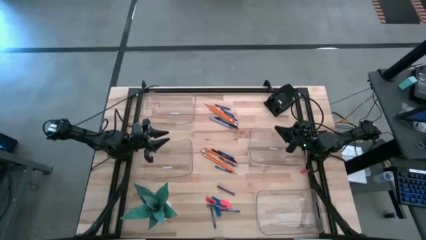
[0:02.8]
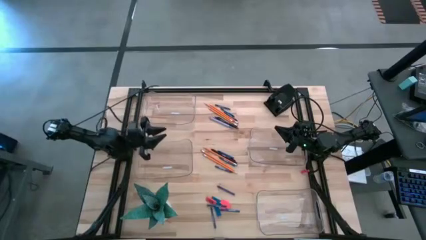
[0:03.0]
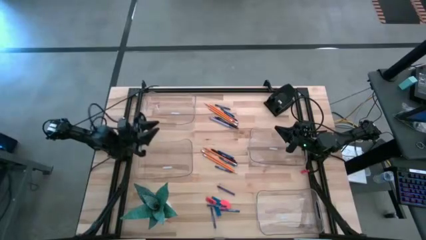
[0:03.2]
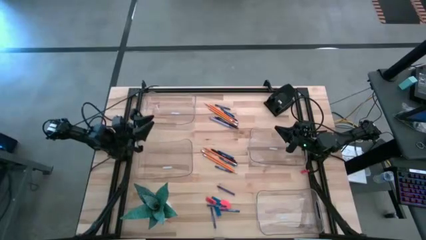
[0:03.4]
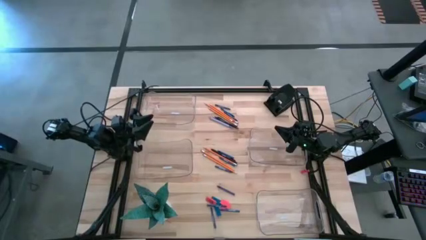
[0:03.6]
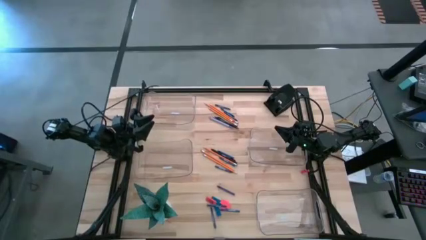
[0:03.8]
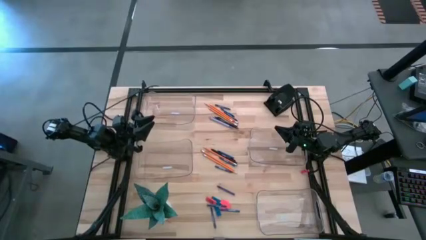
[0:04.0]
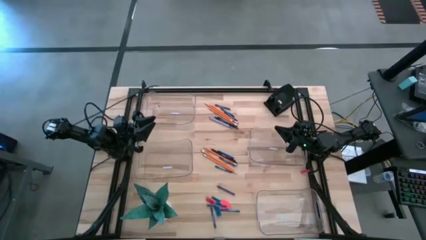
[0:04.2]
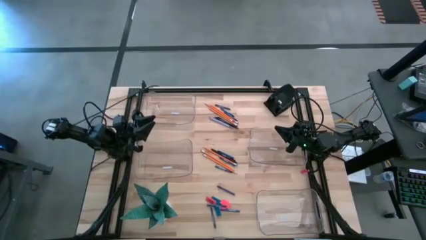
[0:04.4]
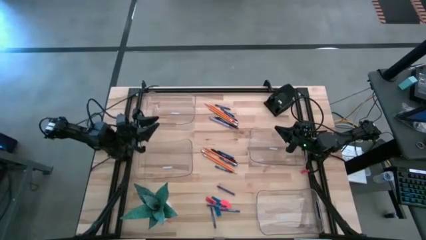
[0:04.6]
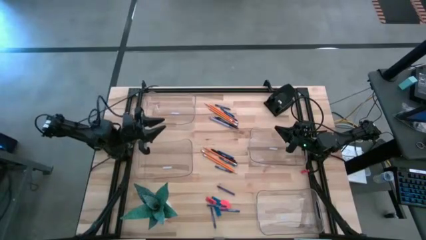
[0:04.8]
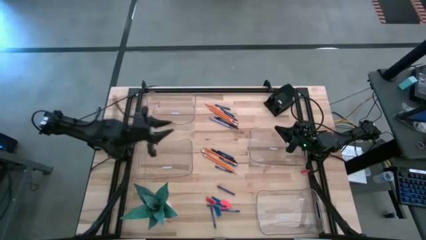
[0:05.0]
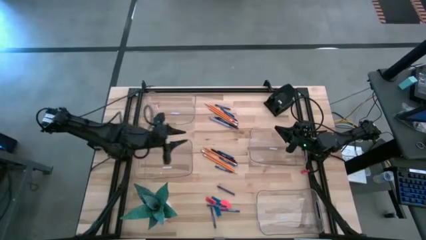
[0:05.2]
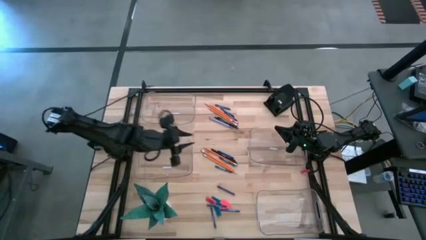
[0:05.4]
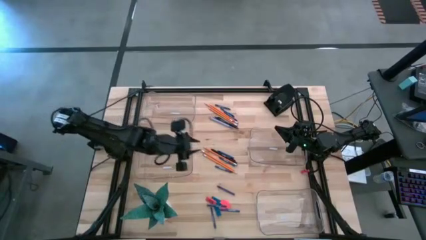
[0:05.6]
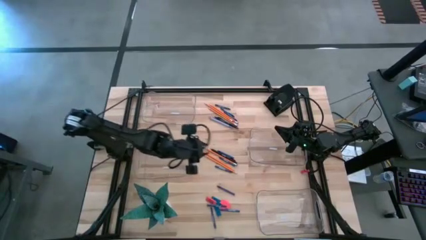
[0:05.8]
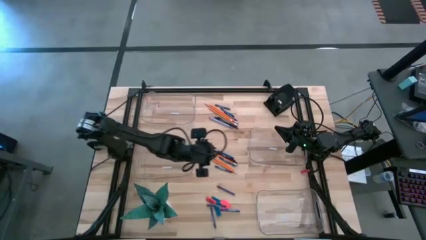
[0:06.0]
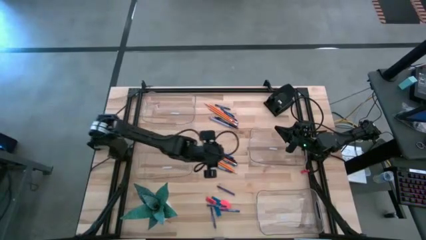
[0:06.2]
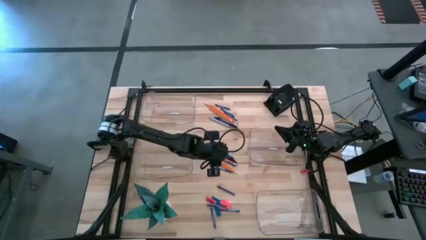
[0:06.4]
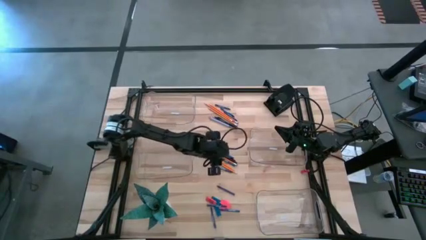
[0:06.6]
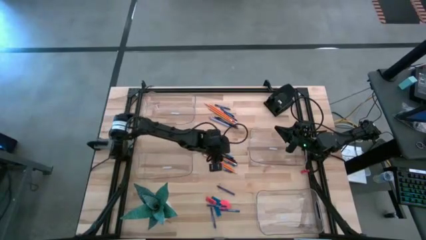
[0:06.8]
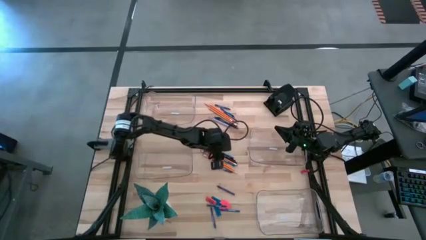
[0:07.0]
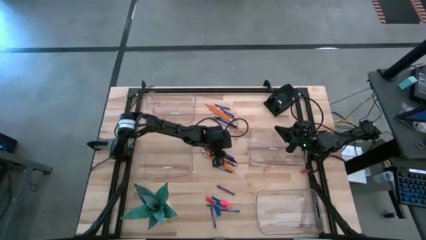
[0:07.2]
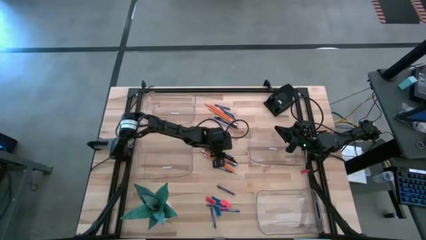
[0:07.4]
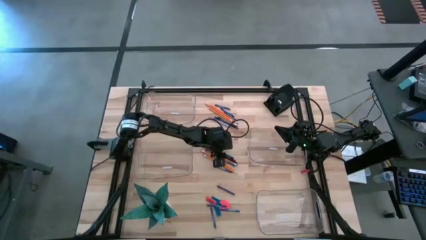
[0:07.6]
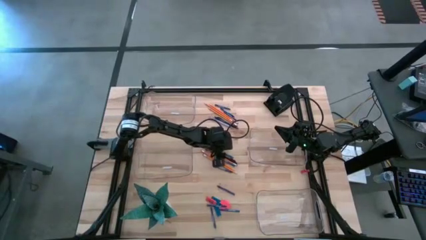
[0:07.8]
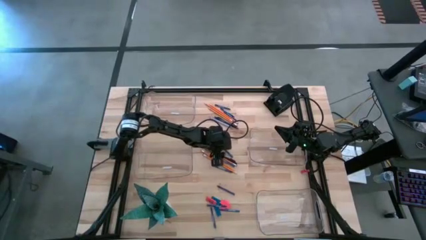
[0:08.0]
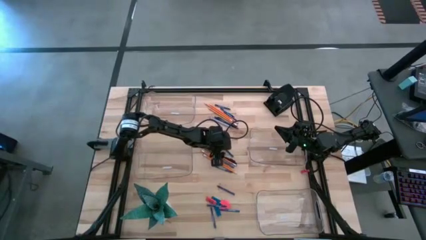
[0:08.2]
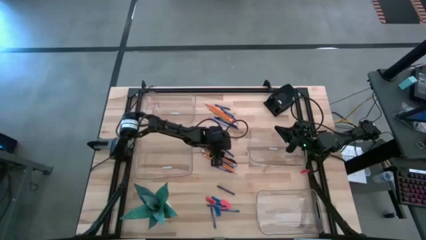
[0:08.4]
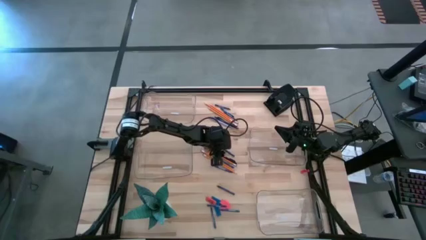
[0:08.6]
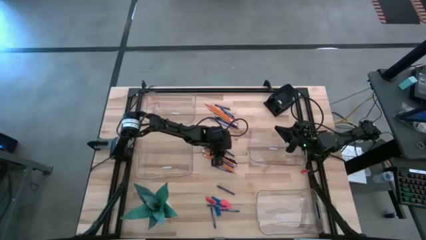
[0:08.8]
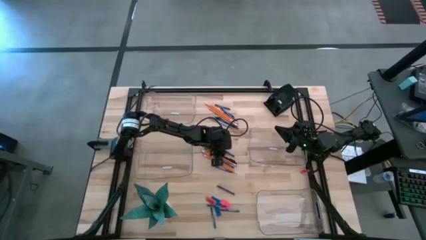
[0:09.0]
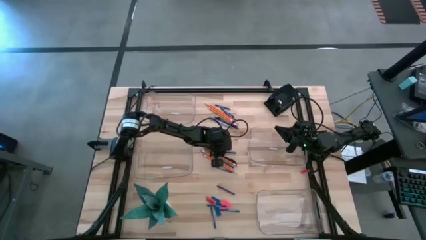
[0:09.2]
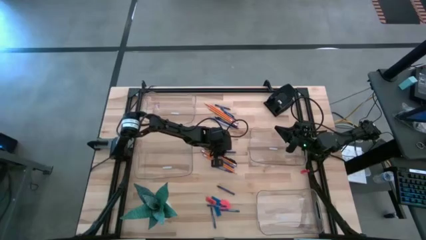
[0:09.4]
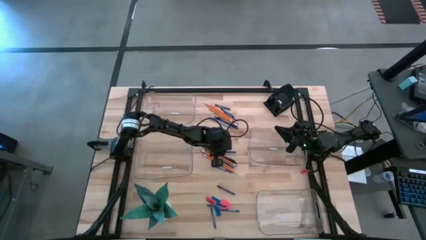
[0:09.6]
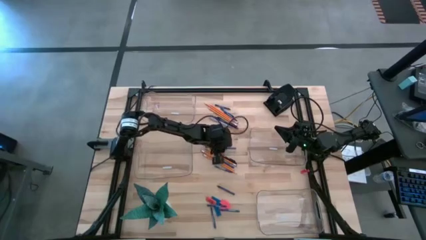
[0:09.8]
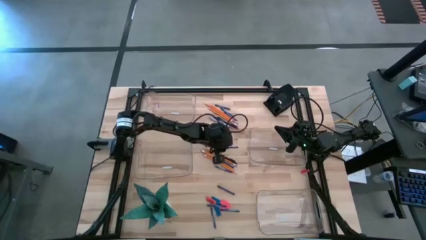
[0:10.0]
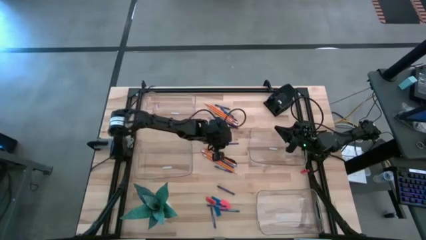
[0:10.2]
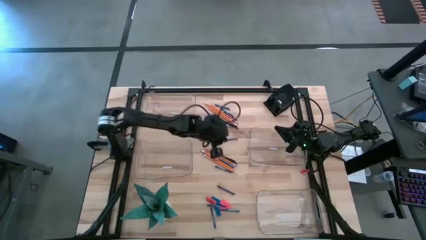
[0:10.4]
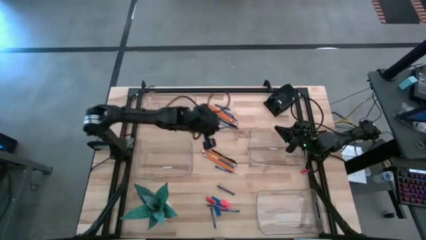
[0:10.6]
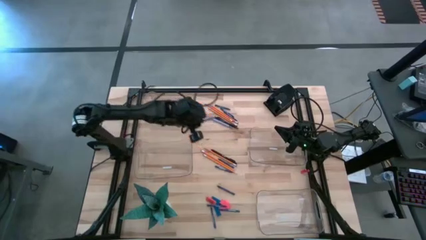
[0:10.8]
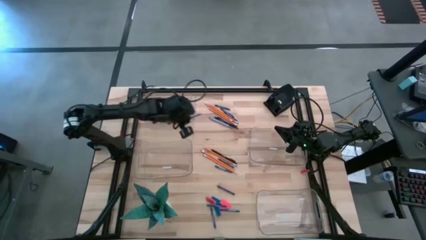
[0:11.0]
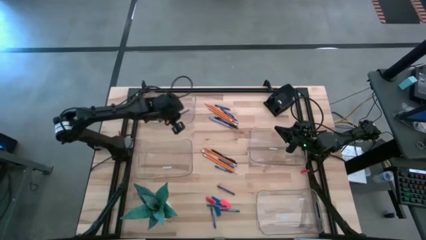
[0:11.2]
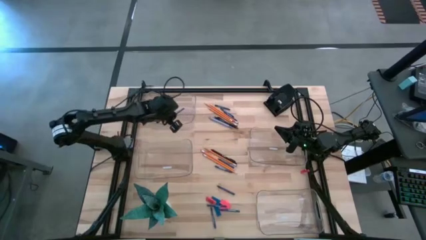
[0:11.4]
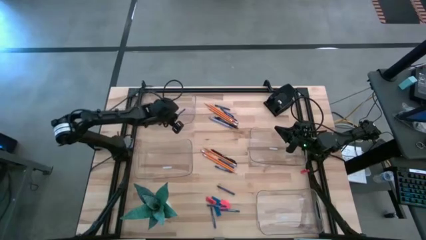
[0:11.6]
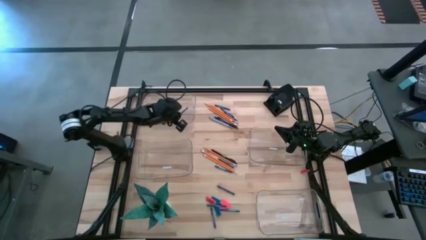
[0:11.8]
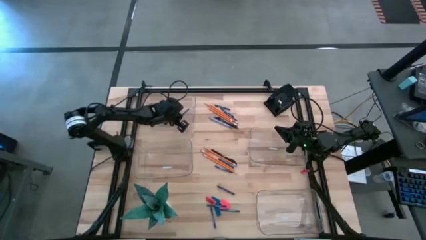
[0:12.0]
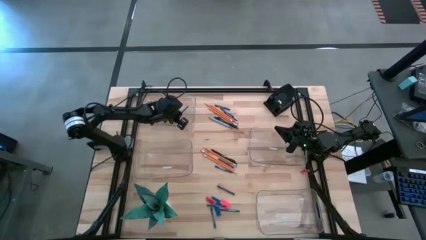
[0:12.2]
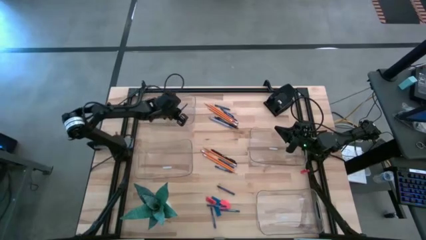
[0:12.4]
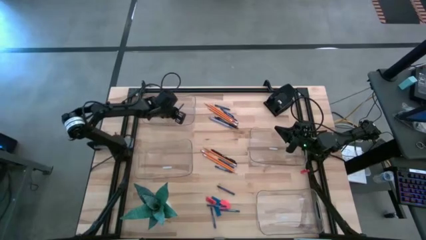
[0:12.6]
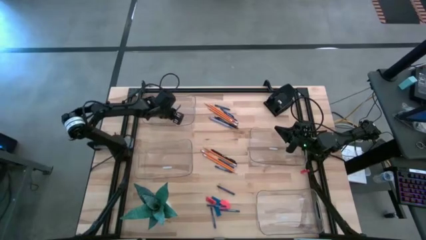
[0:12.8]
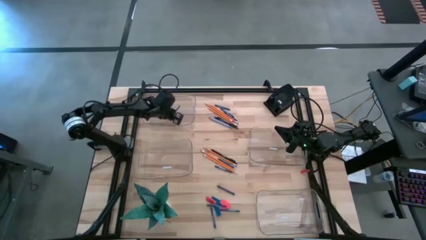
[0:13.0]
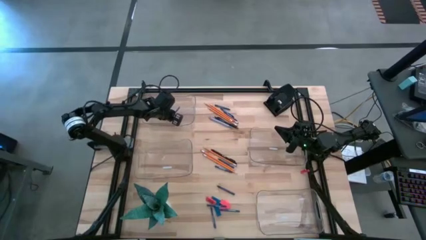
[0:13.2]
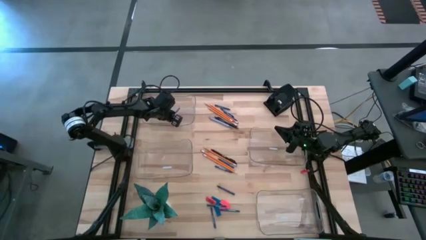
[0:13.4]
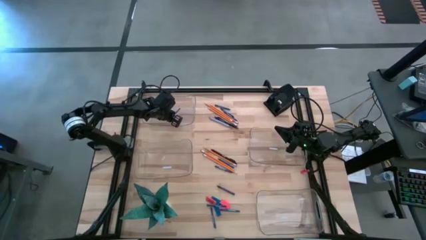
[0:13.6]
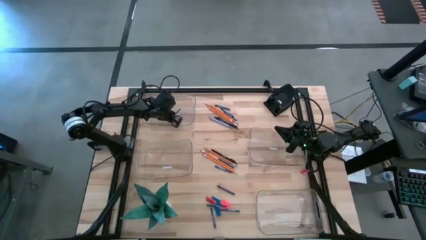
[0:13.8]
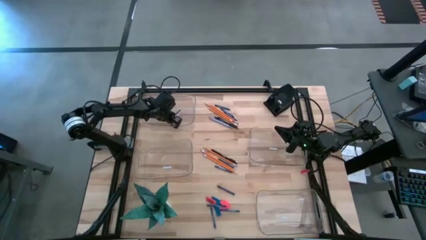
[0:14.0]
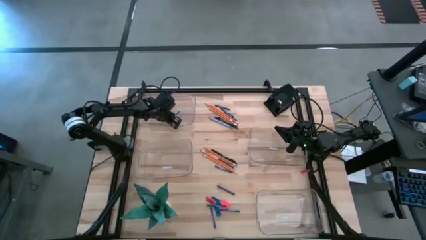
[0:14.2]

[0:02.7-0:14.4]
Task: Sort crayons/erasers/pens/pencils in bins
Put the blue crayon into the top transparent bin

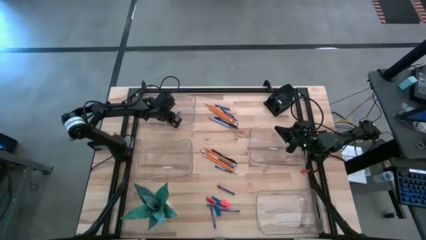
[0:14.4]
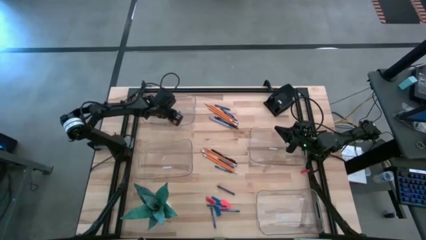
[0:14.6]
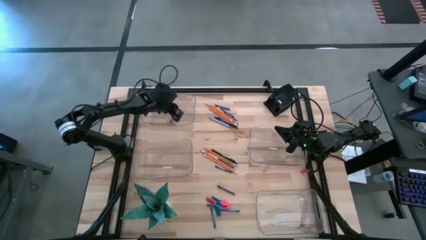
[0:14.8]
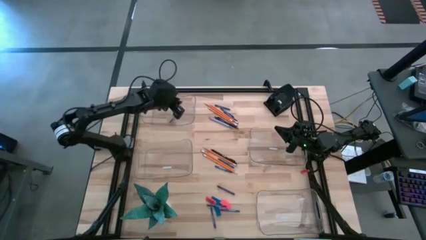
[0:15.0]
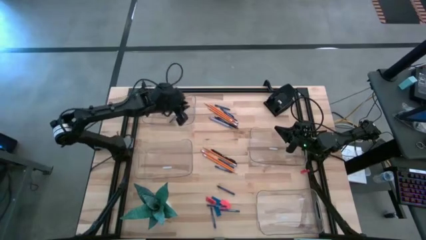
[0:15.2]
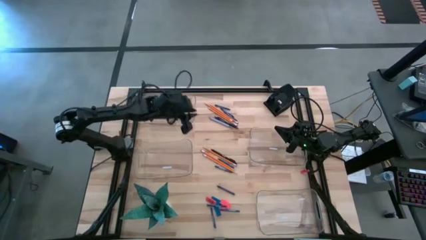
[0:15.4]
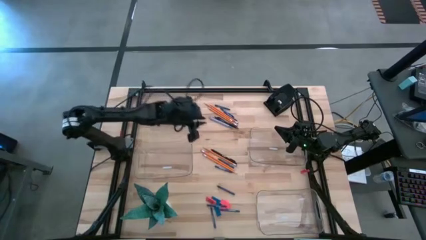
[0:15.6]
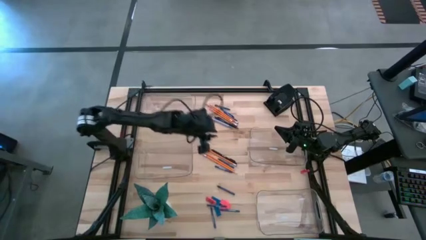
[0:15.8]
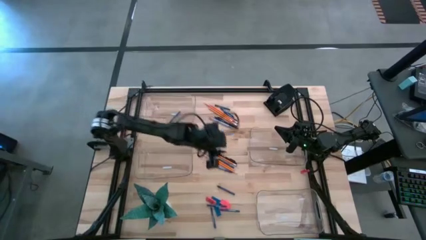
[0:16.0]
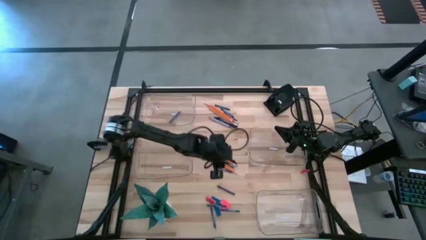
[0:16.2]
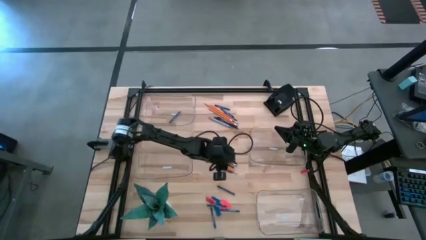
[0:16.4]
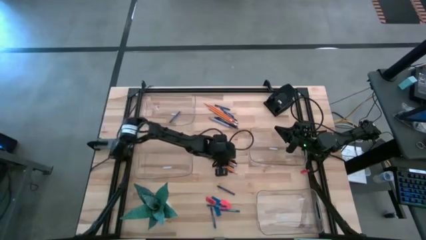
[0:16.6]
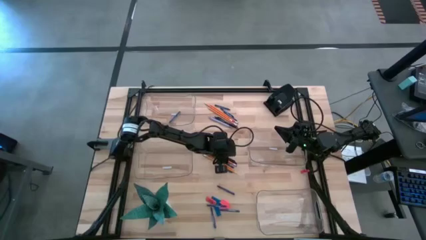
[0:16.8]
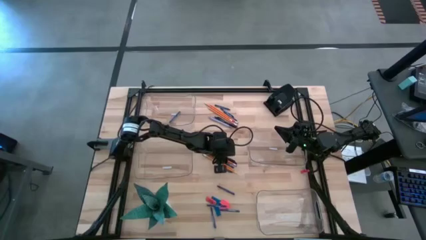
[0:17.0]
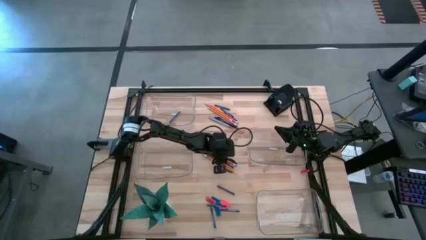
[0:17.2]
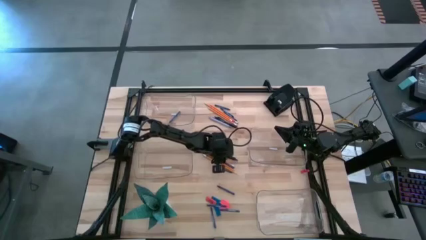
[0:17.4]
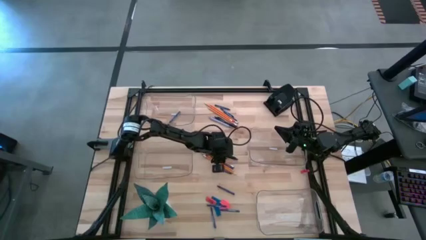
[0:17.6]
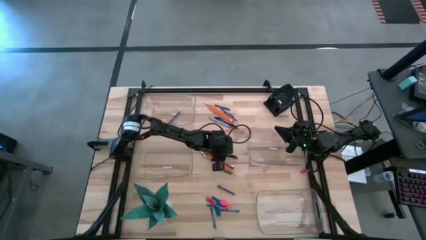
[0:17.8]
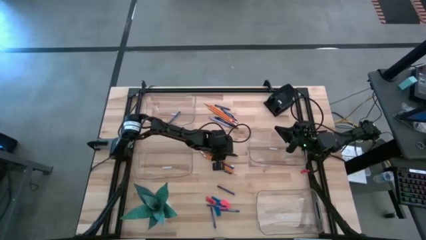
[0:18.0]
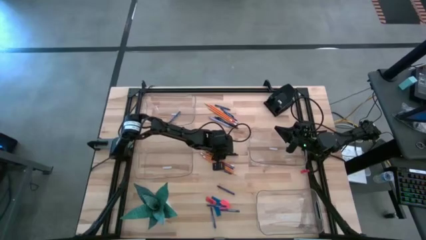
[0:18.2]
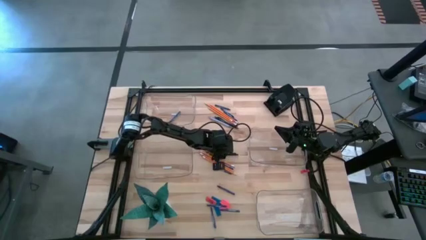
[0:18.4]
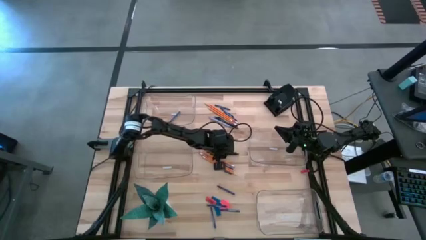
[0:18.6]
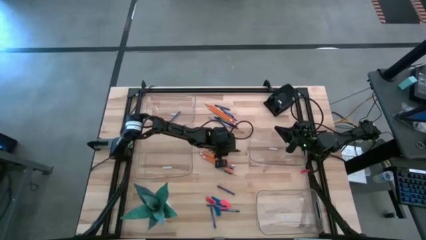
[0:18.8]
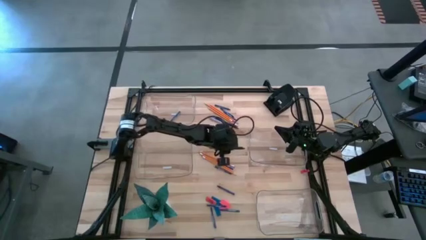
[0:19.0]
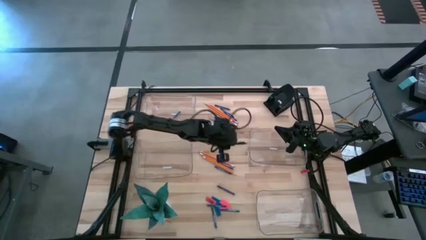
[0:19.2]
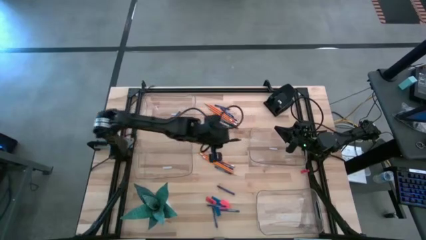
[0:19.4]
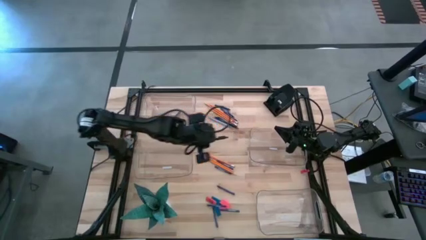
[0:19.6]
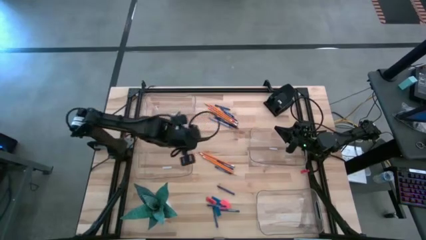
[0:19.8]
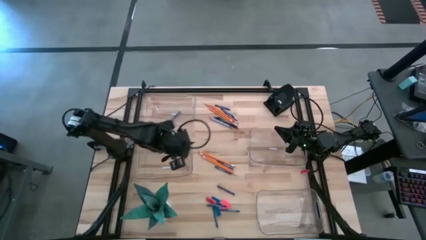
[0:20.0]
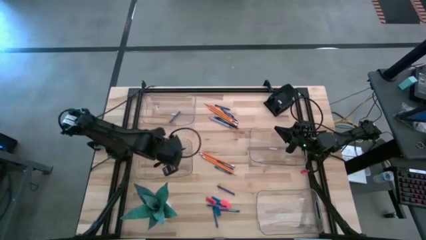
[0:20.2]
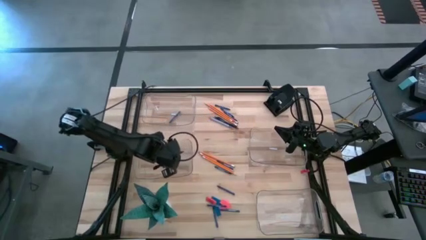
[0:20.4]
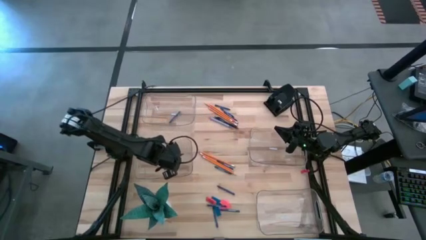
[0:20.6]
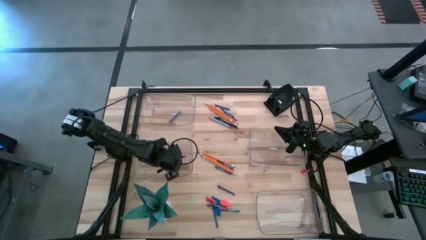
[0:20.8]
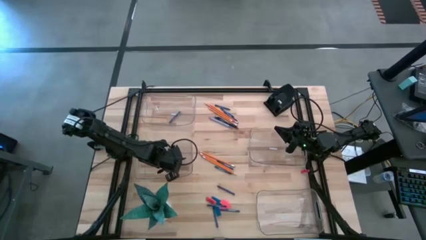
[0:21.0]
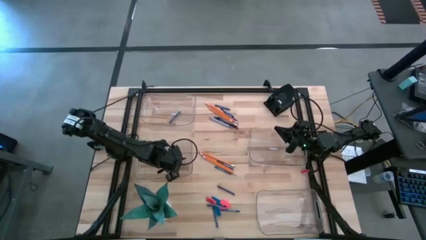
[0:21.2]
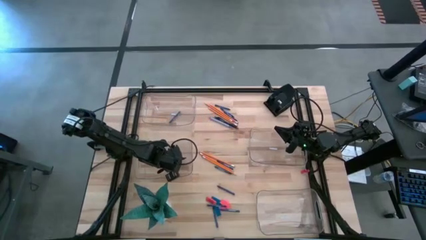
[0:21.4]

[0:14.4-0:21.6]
Put the black pen into the middle left transparent bin
